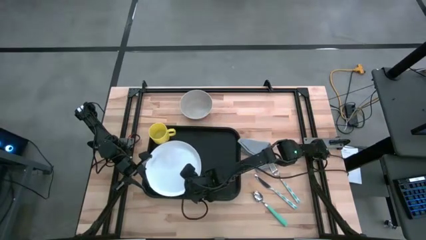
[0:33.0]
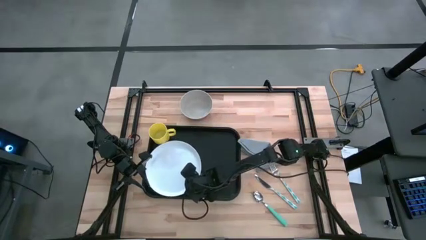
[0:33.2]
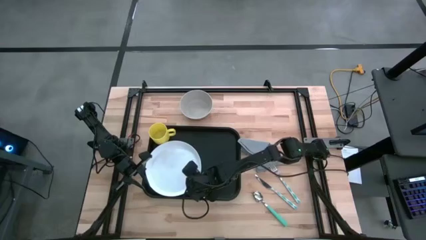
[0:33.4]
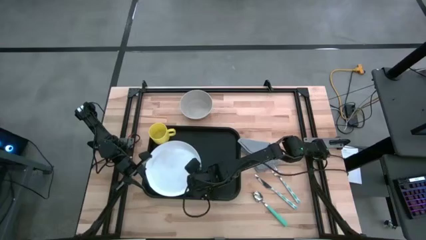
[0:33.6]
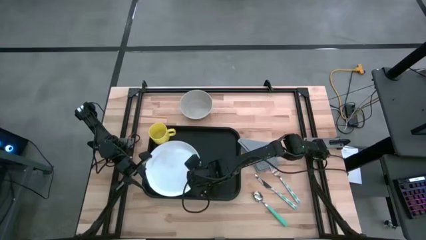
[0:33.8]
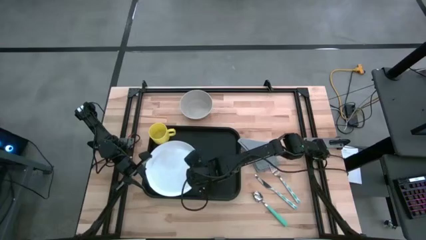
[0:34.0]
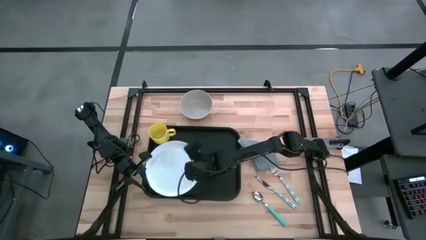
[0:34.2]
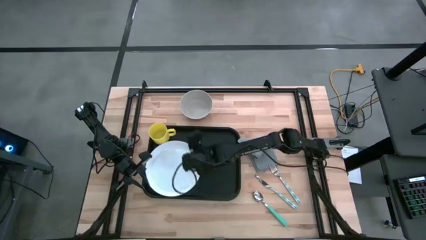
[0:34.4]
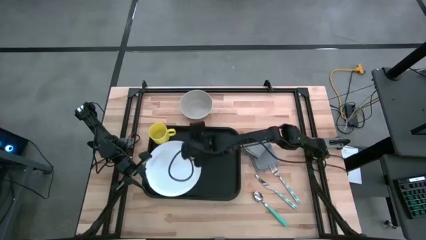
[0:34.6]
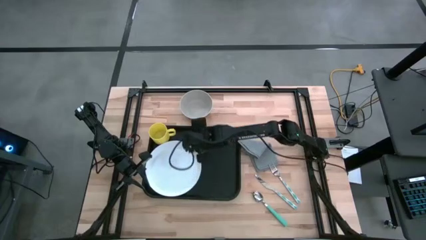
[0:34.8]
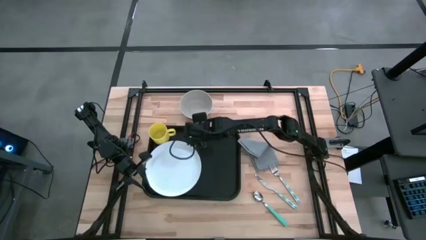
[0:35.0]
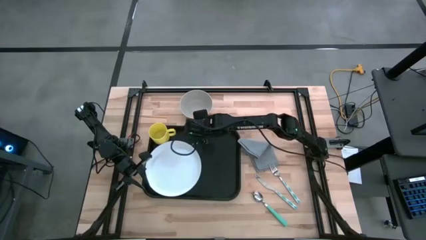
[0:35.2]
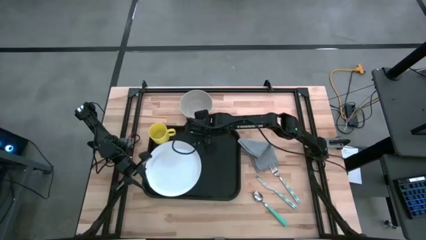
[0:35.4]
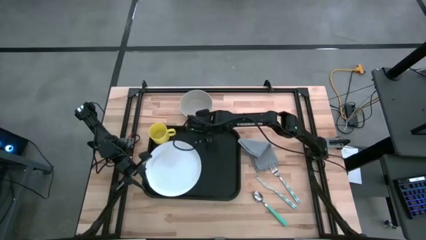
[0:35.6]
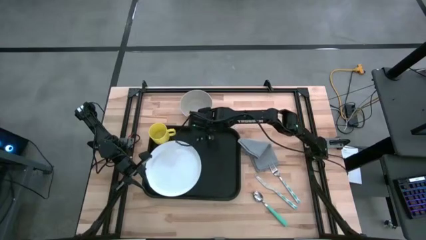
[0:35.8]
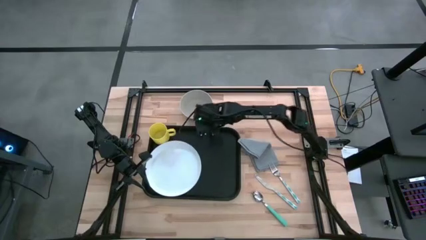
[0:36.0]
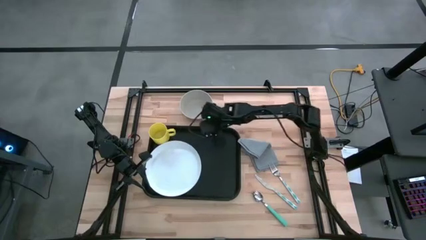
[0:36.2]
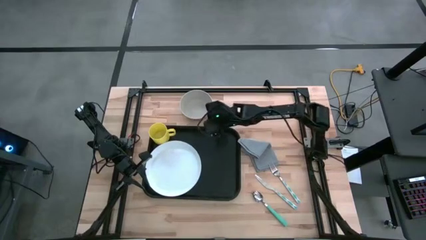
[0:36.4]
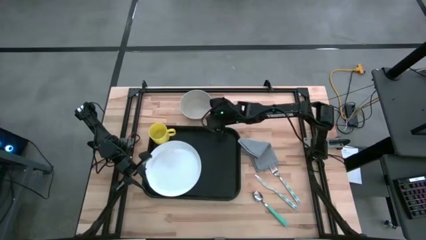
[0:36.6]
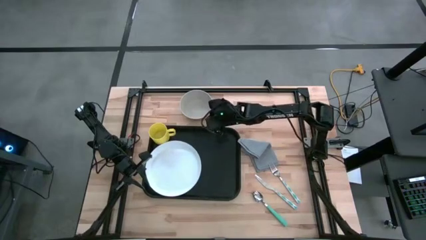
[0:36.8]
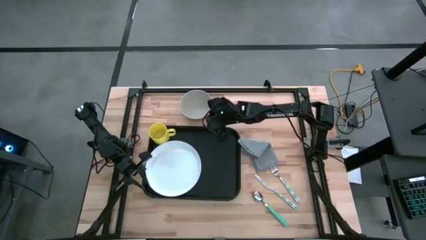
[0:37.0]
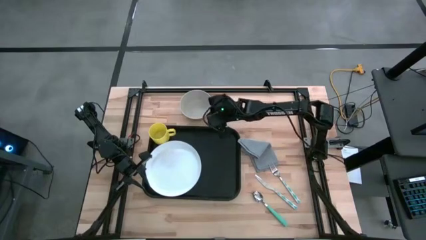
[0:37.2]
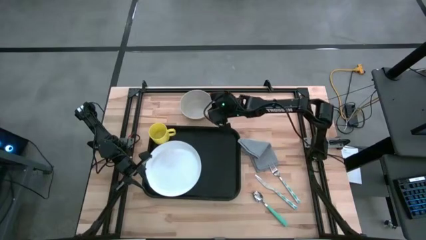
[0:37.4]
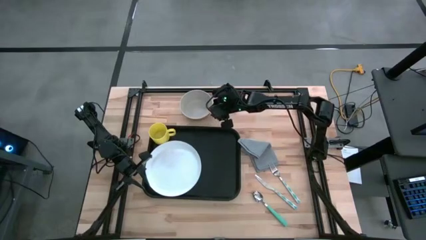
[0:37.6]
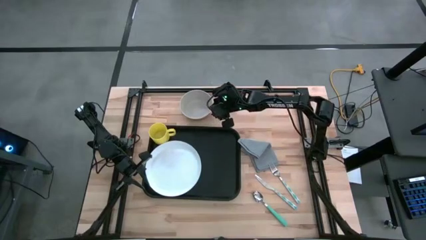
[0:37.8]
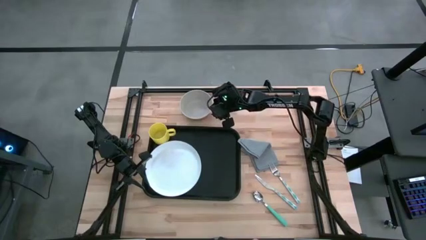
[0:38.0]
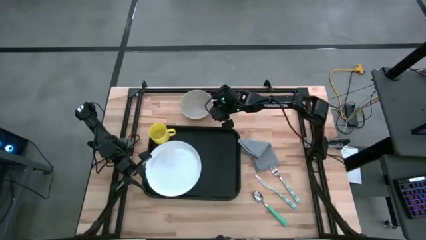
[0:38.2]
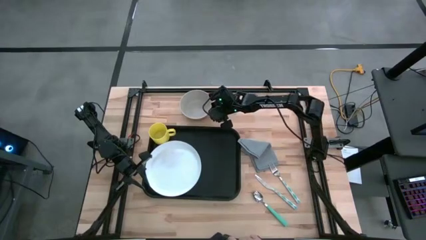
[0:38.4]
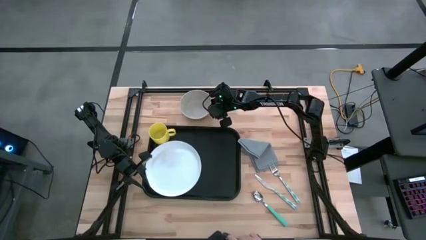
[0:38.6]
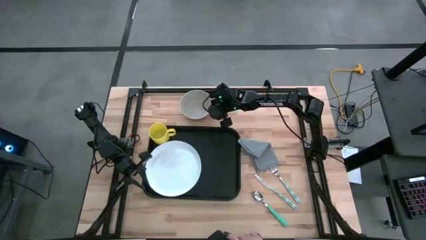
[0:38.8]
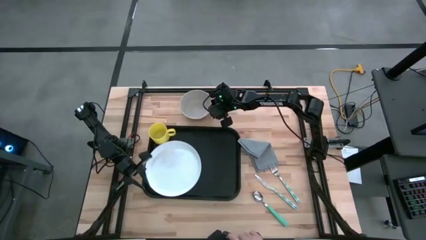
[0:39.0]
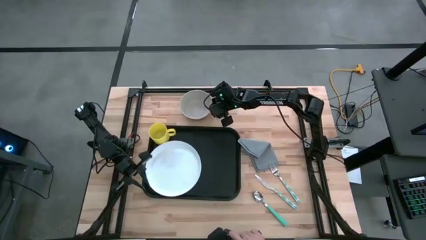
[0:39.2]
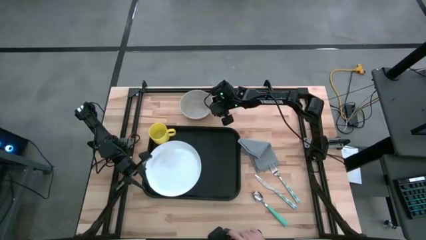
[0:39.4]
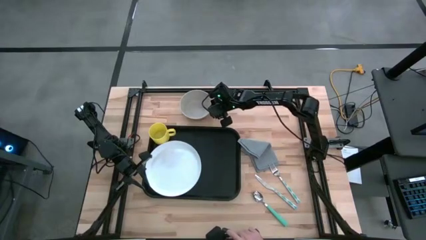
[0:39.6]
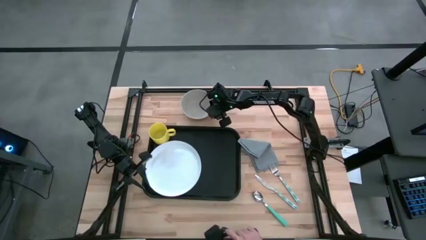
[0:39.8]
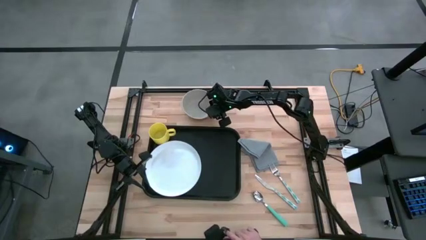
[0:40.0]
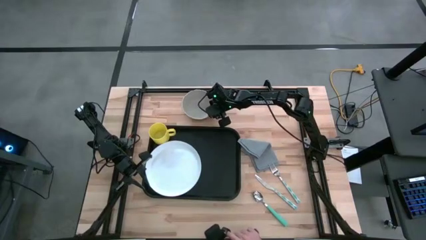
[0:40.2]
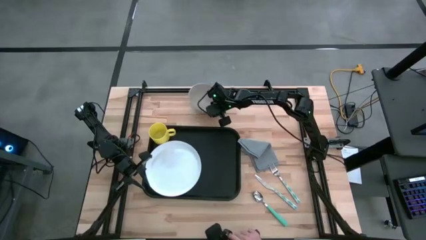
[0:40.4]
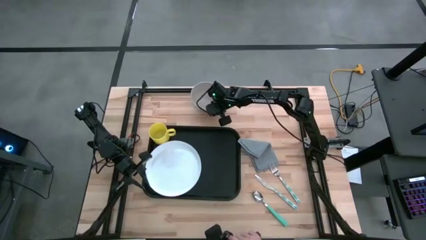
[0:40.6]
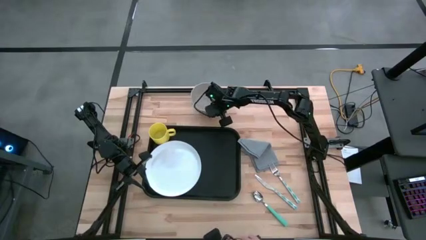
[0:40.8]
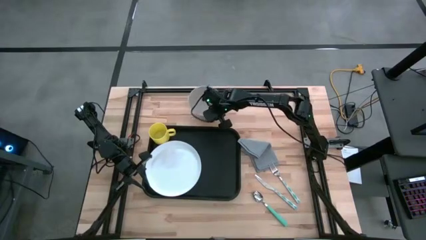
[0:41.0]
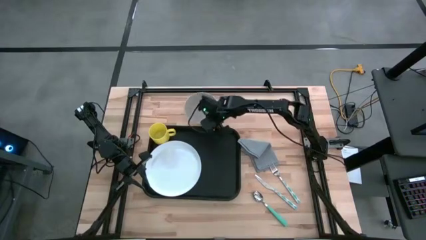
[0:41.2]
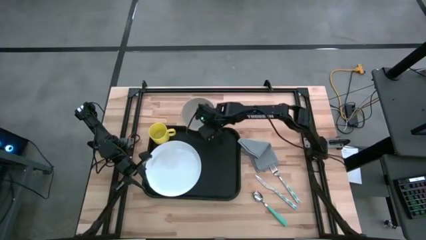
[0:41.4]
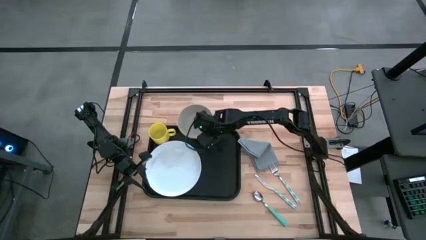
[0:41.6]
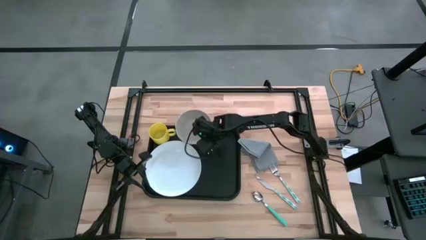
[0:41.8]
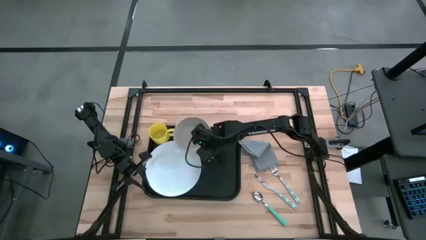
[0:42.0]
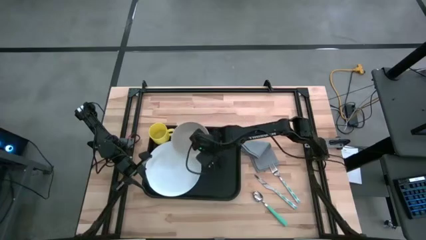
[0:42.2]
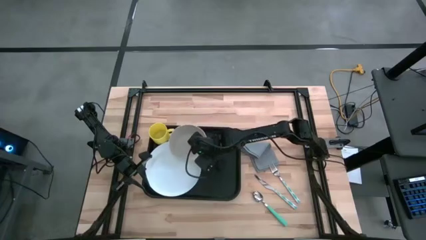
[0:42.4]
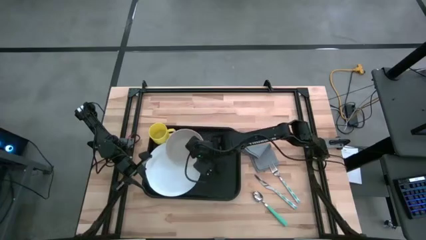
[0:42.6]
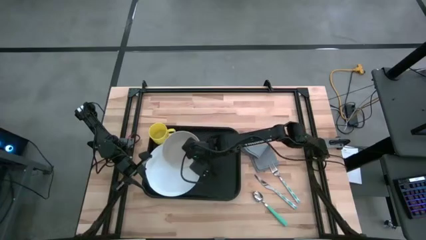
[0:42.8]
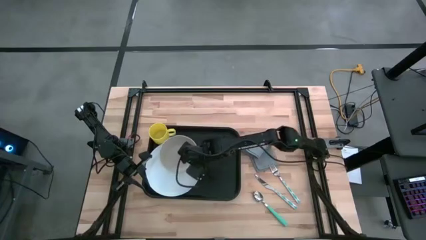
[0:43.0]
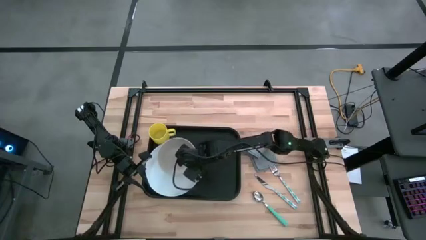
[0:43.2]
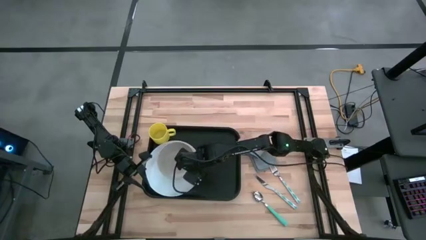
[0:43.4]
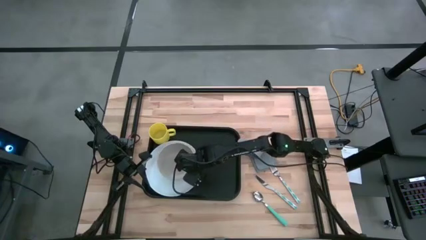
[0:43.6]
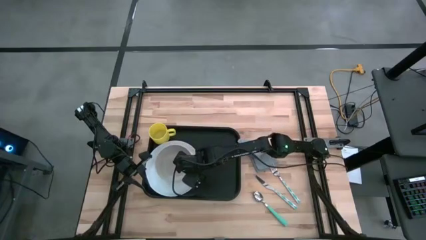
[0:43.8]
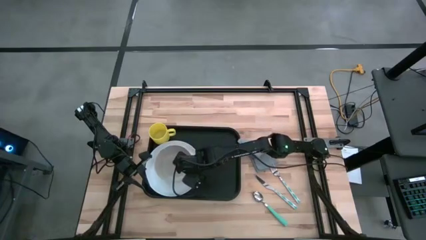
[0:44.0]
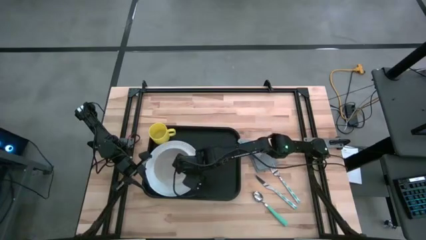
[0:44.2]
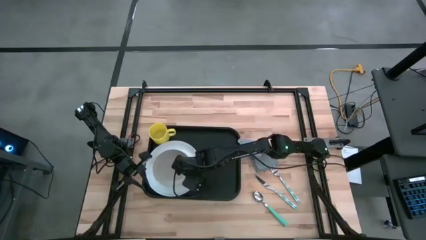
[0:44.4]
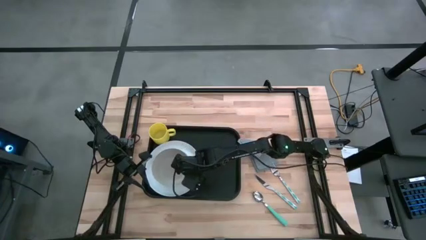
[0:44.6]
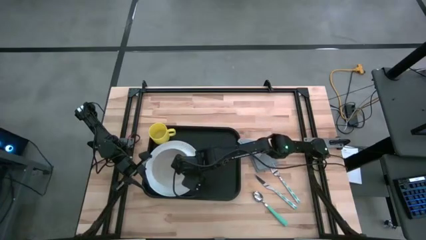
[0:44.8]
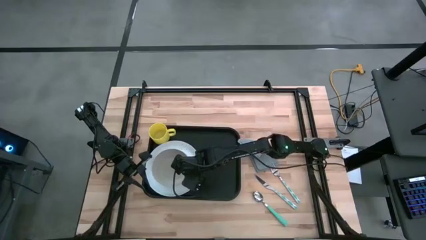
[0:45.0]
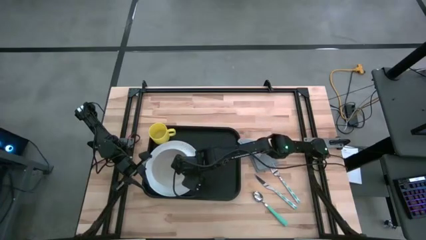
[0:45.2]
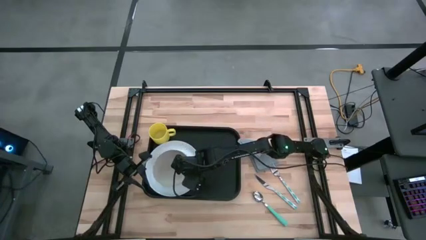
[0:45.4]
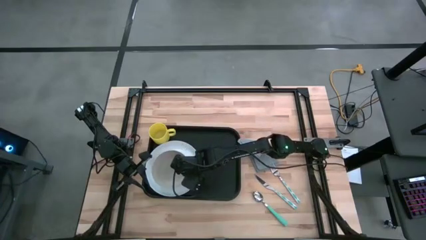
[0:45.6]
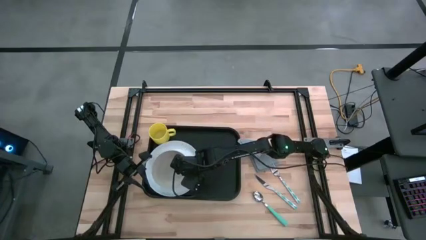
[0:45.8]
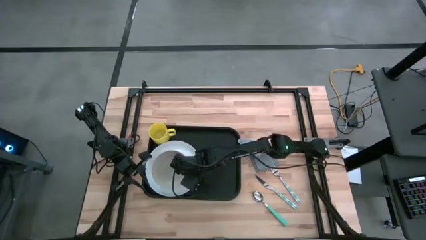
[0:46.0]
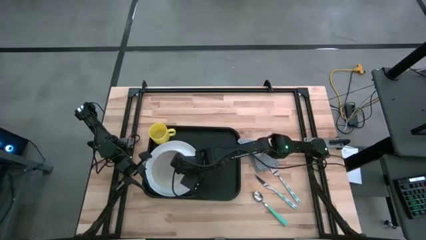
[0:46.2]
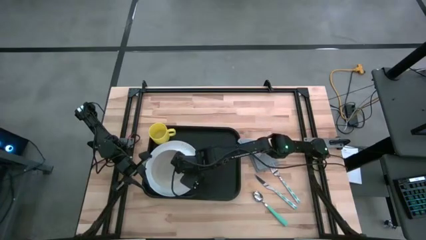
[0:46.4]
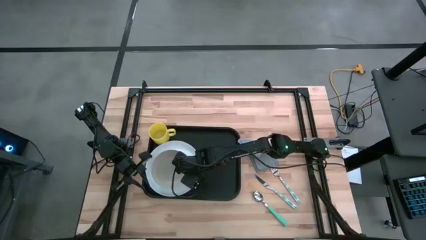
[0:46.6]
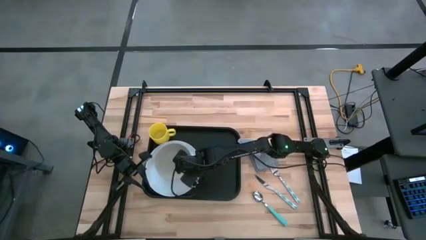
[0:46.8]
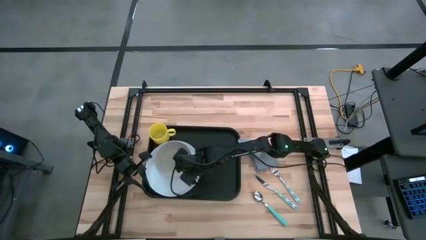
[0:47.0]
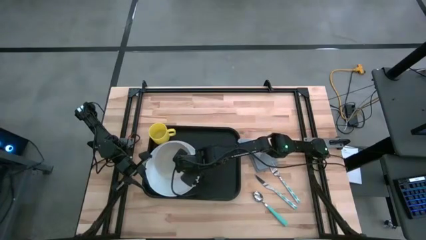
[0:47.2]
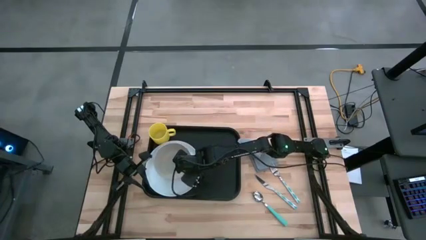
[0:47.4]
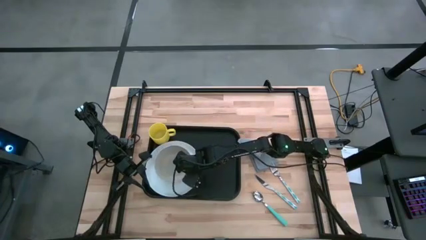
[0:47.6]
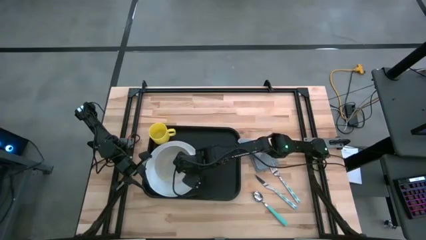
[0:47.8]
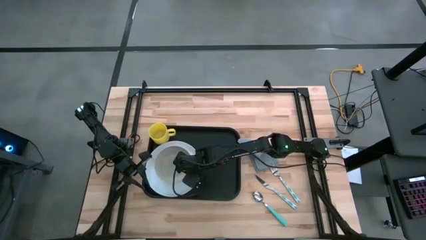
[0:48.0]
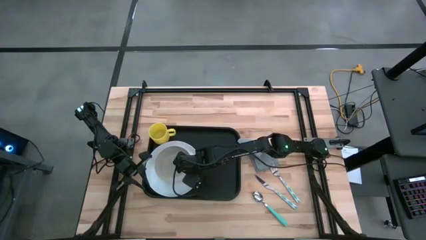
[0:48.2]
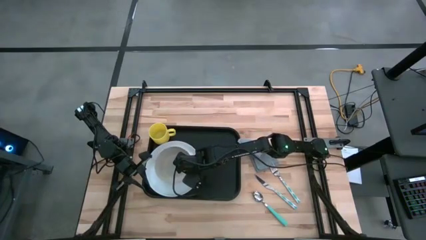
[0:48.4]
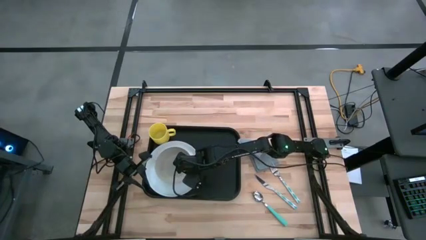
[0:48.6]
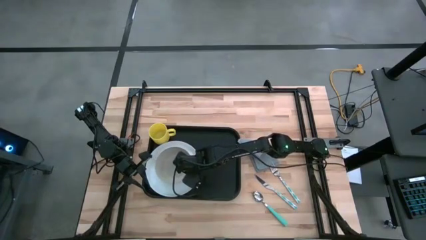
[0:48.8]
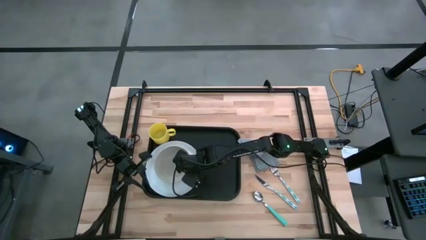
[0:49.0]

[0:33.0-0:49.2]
Task: Set up tray
Put the gray bowl on the white plate below the yellow mug
